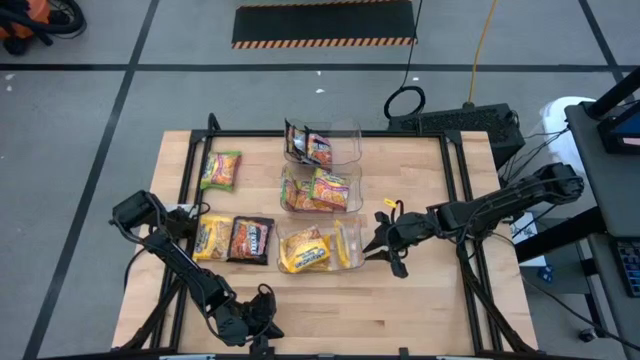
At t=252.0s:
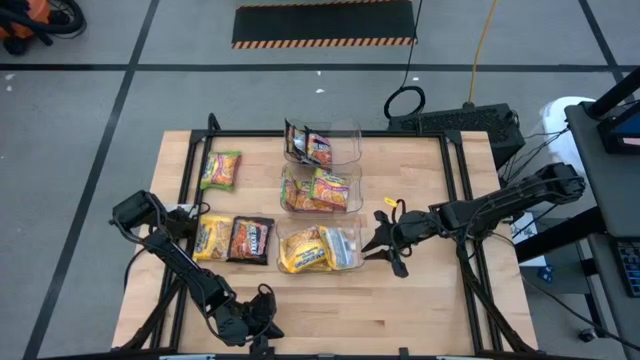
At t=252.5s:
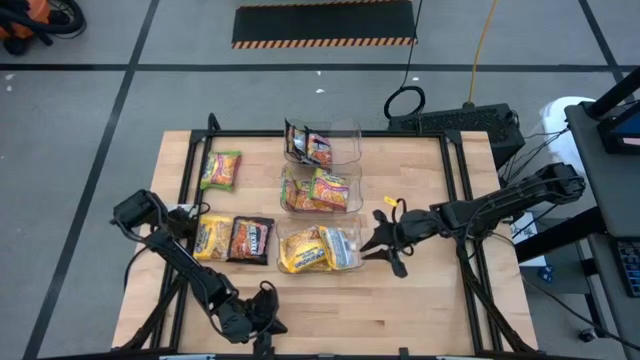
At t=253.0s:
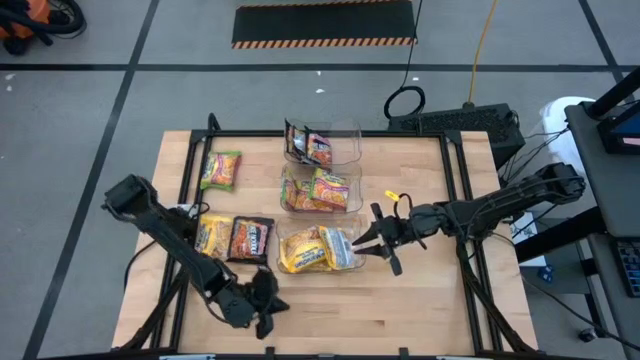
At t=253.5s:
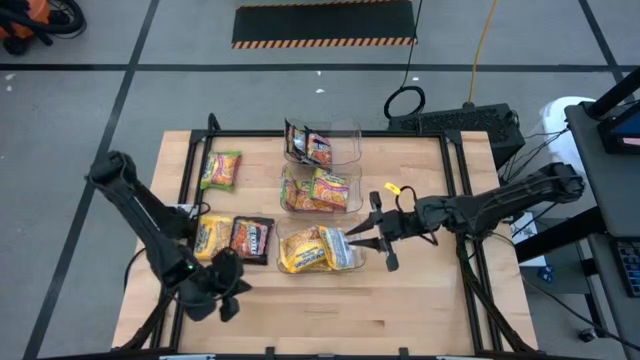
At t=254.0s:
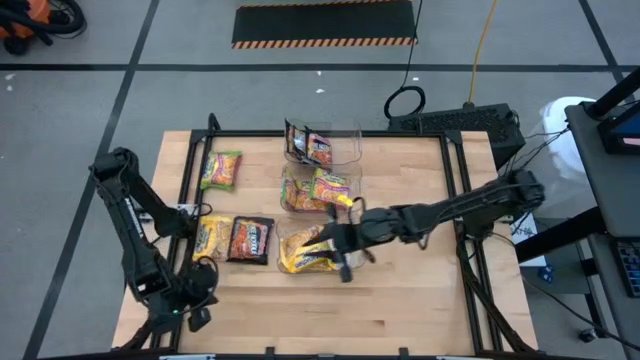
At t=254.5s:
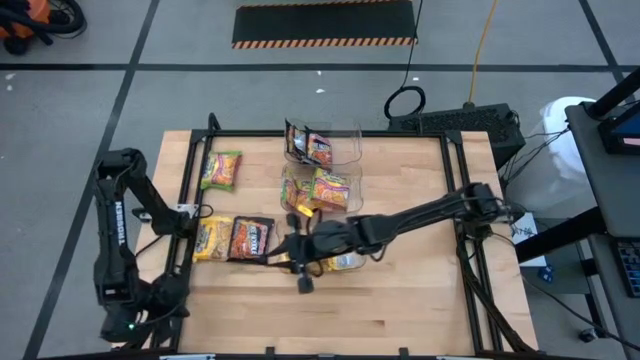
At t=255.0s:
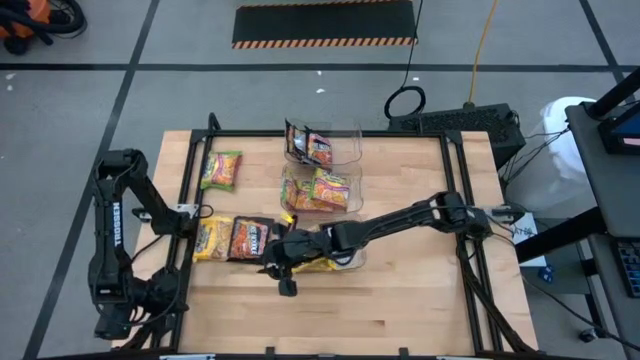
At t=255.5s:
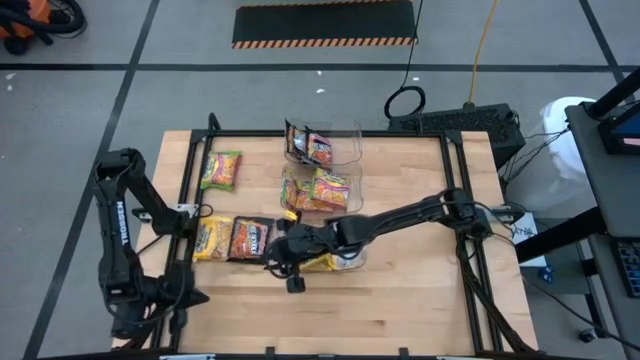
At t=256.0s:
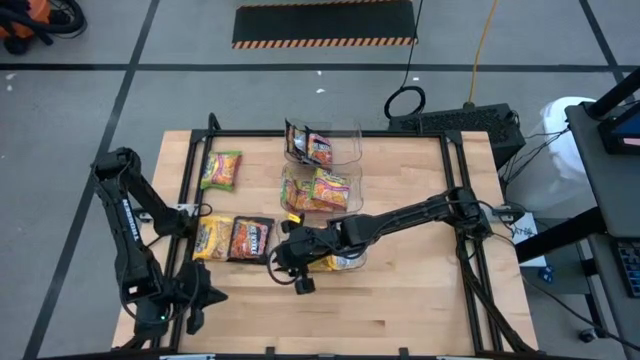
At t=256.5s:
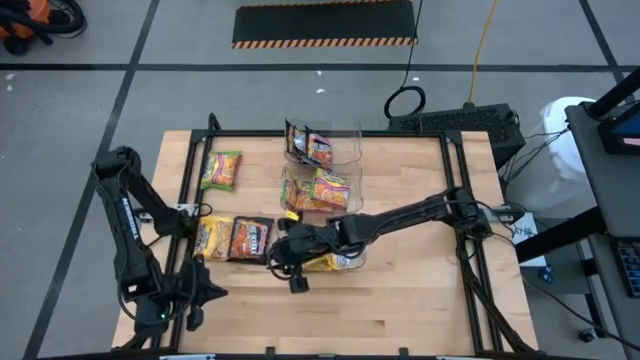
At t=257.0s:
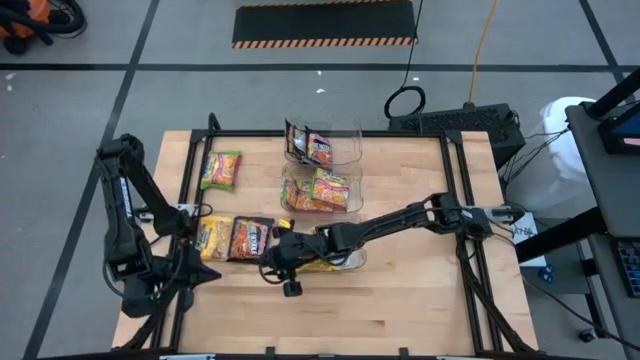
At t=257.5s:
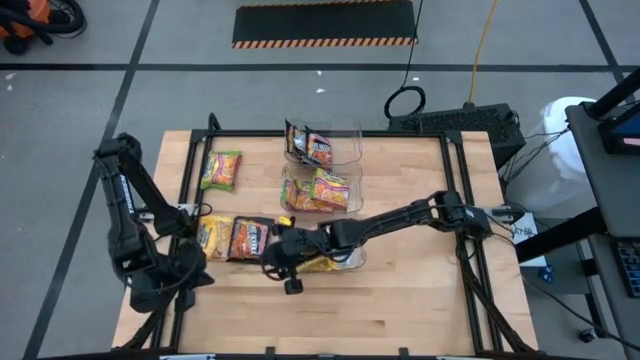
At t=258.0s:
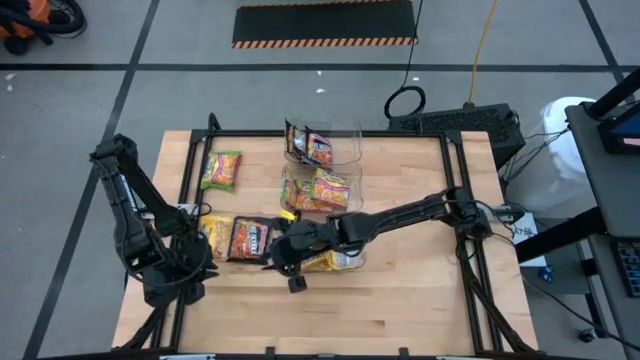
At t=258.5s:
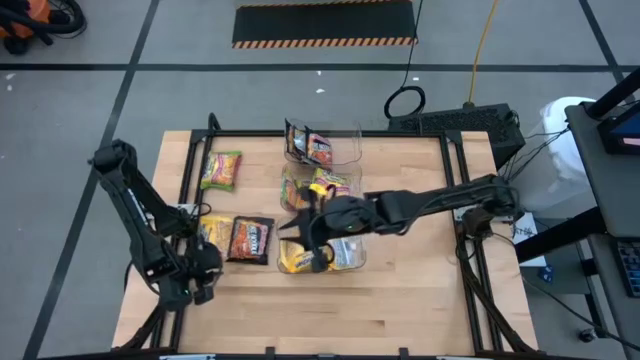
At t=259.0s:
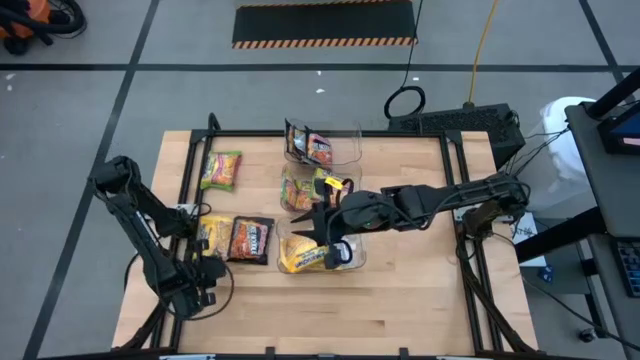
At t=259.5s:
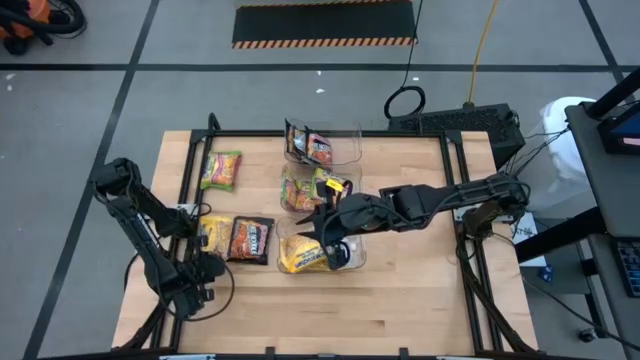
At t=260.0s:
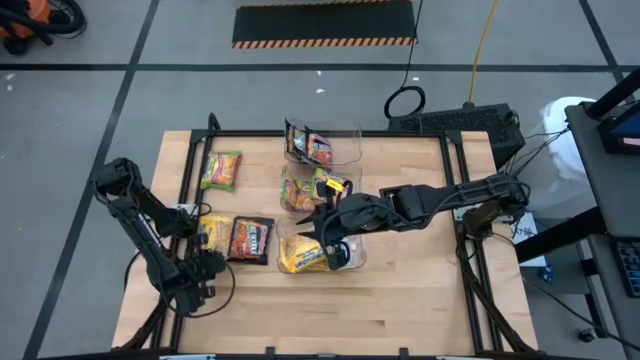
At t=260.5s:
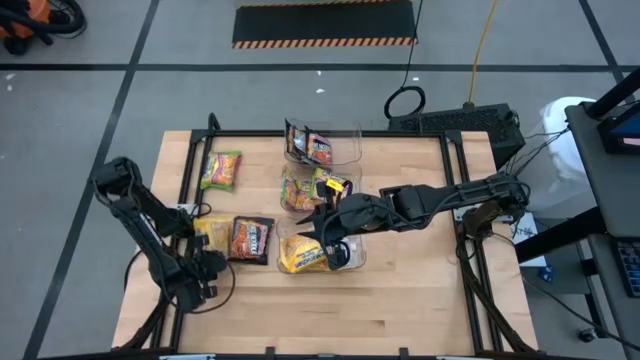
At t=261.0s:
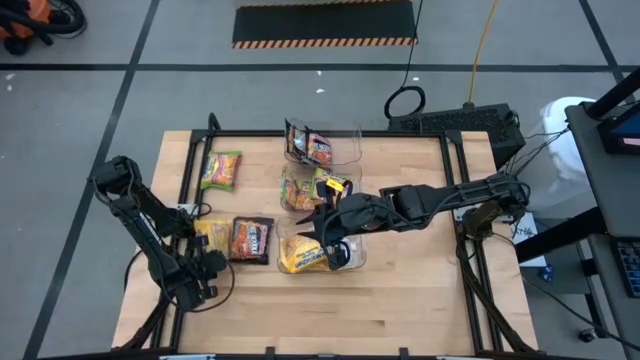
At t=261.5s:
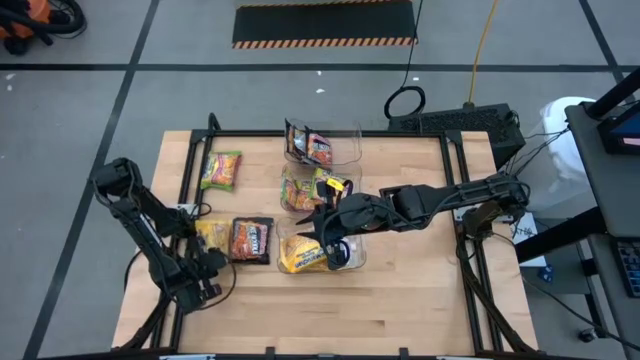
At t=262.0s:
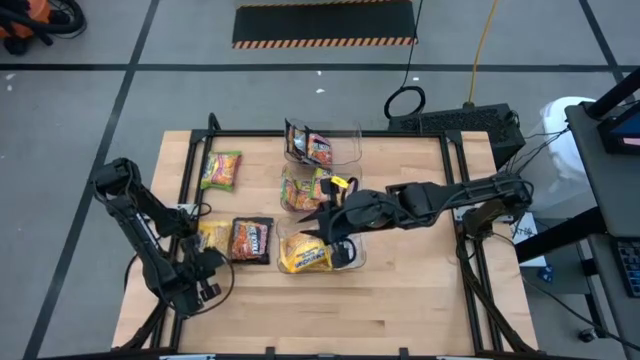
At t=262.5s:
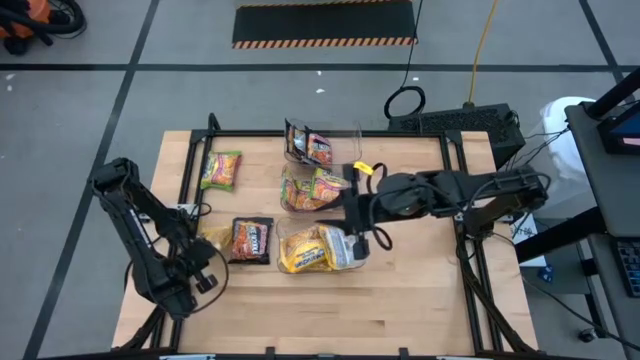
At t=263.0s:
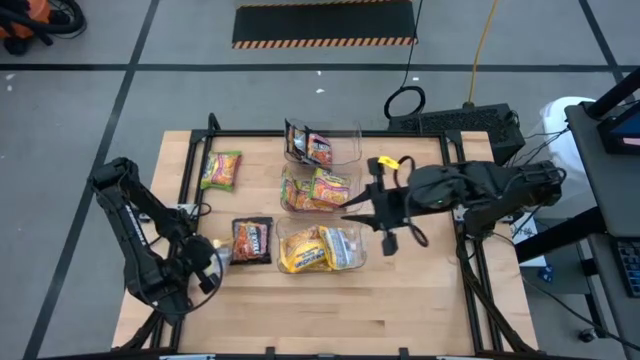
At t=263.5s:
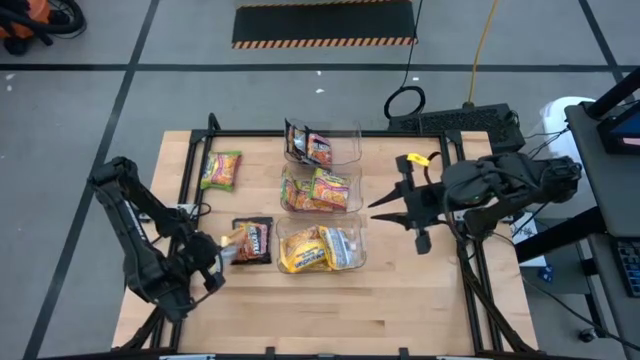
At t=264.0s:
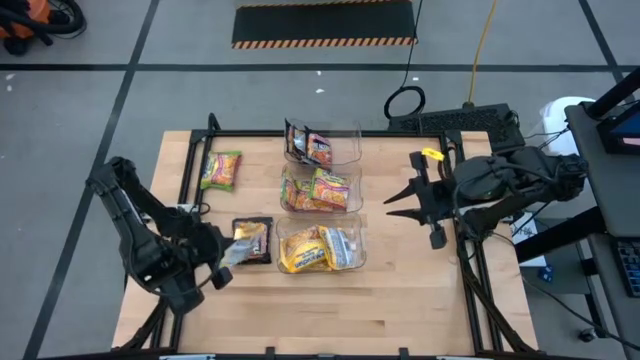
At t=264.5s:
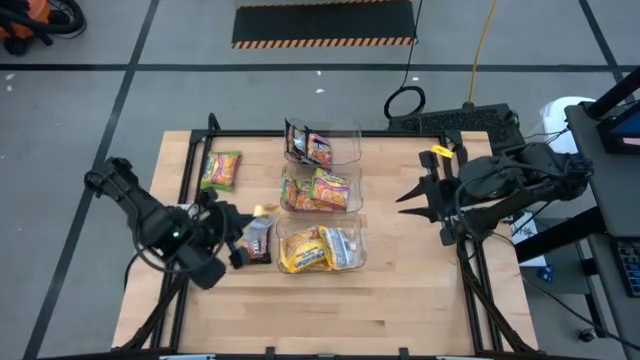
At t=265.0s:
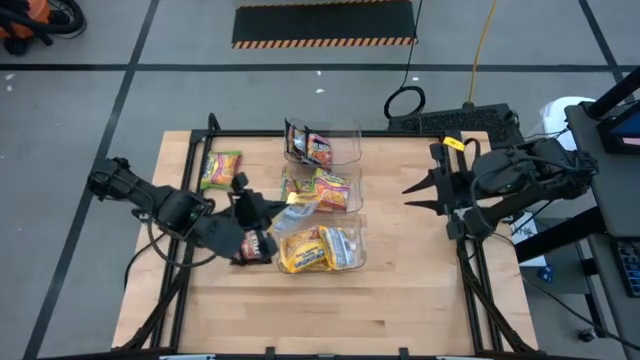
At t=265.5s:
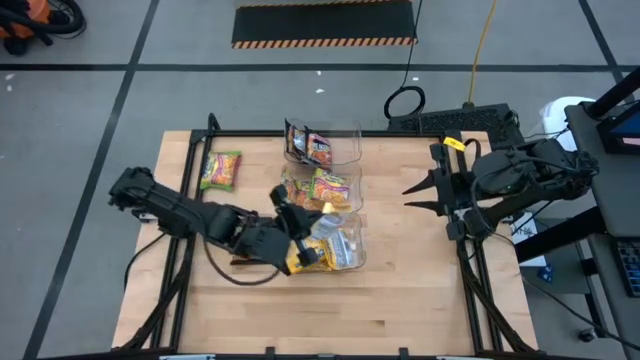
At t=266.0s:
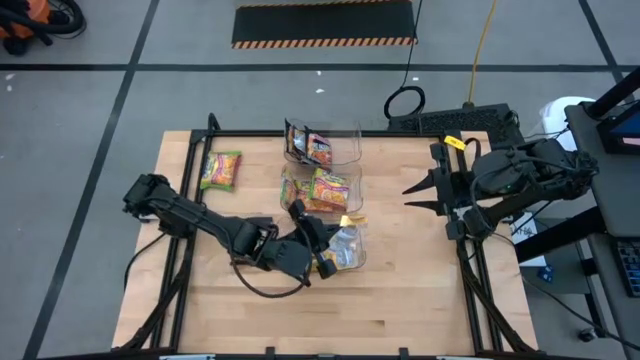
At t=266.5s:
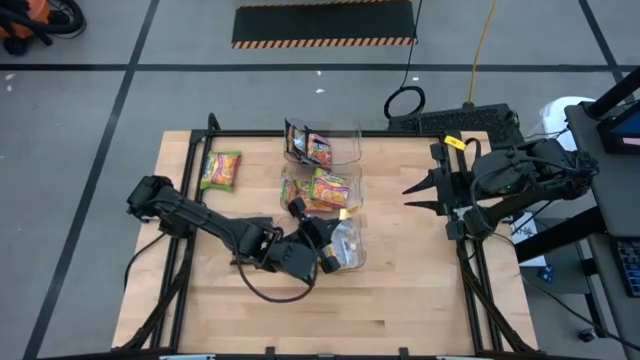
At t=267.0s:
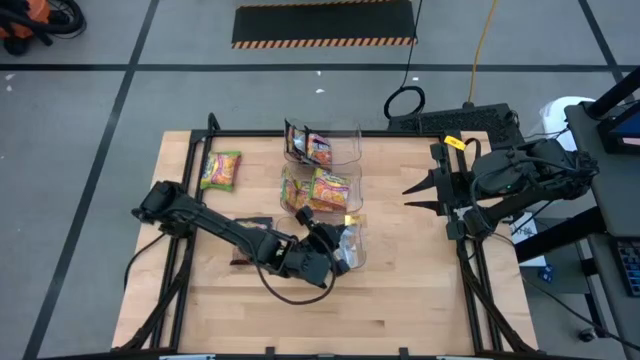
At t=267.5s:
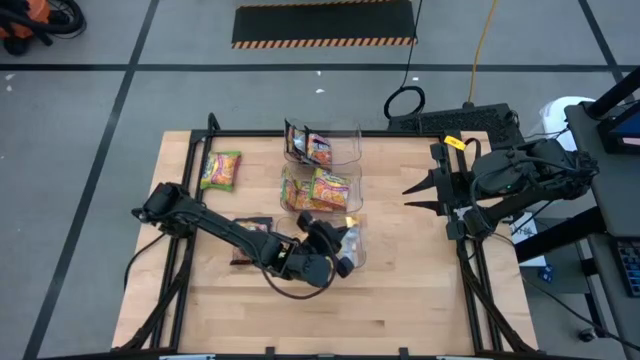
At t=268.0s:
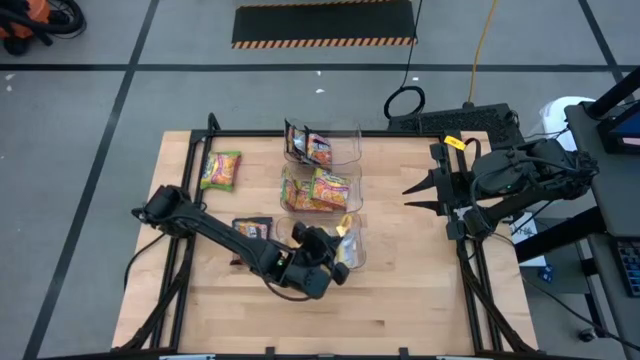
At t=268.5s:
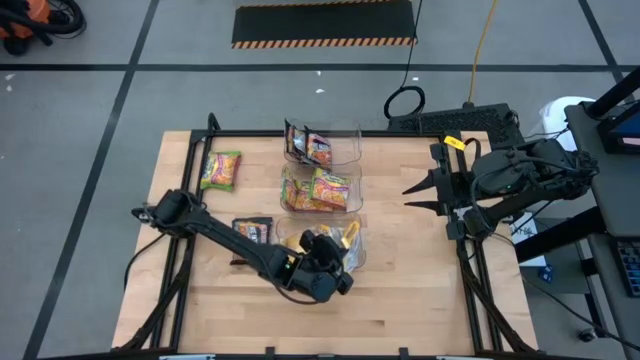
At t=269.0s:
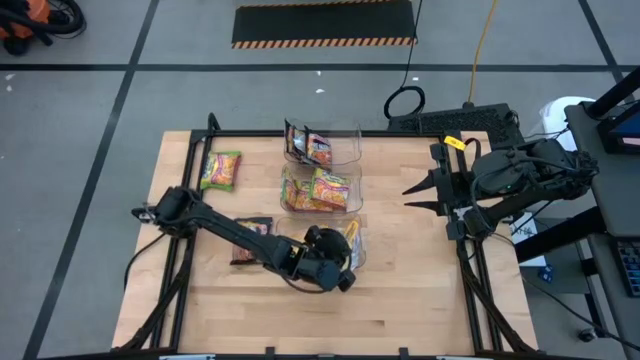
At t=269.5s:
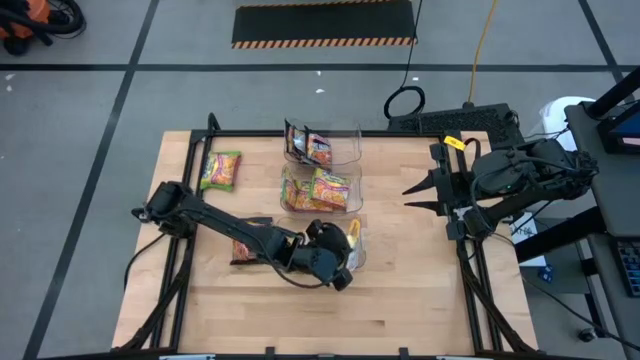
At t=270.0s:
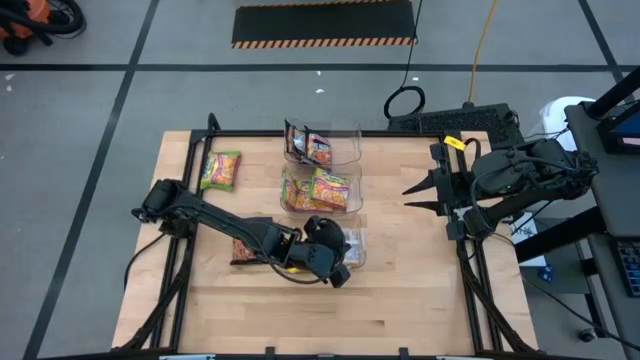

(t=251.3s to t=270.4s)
Task: Sort Maruchan noodles
Put the yellow noodle pack into the bottom transparent bin

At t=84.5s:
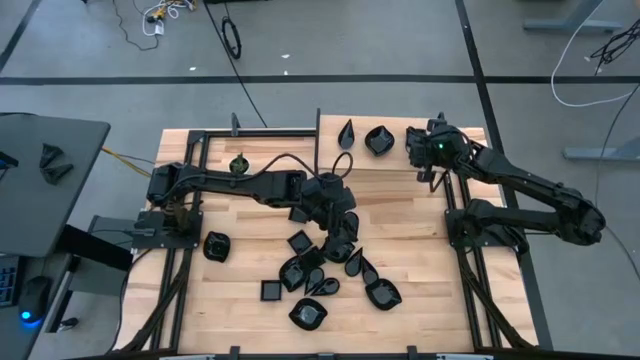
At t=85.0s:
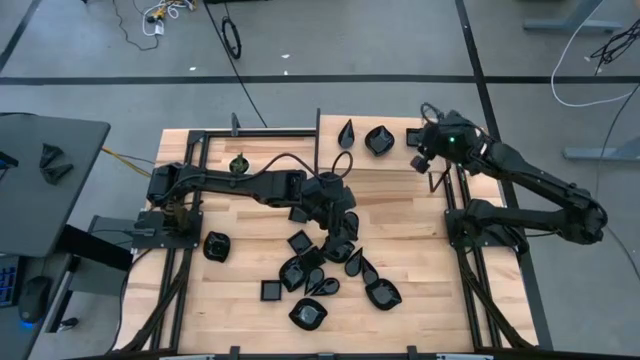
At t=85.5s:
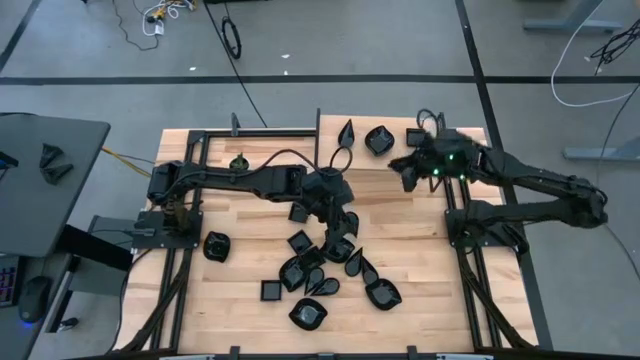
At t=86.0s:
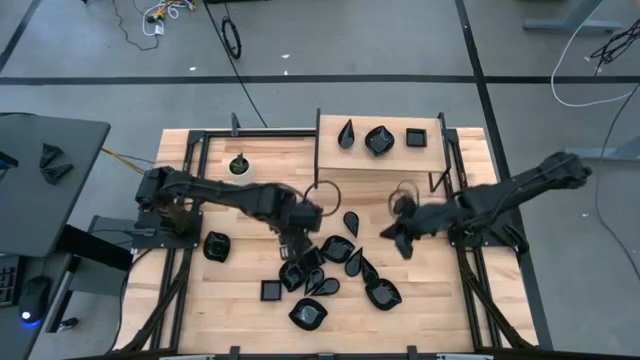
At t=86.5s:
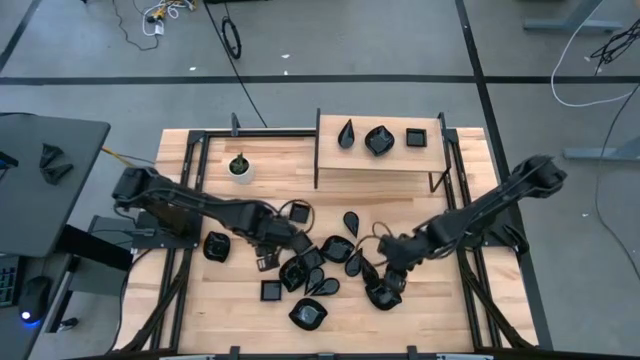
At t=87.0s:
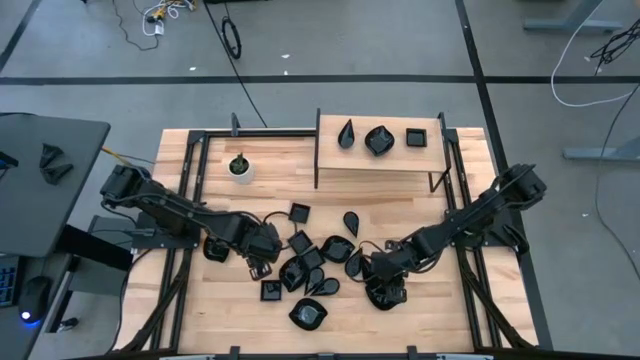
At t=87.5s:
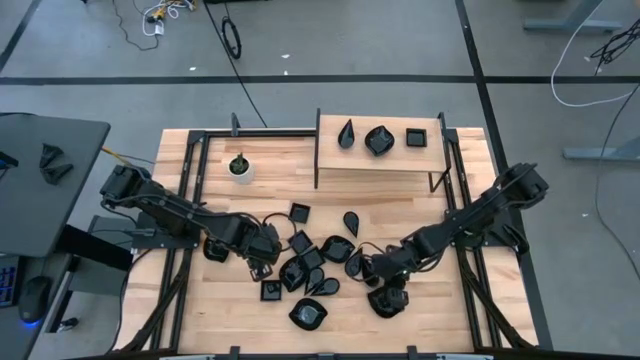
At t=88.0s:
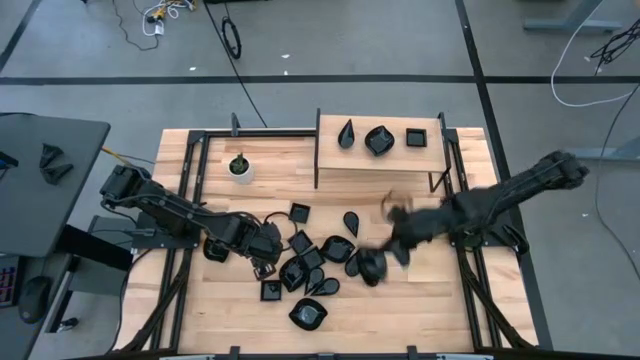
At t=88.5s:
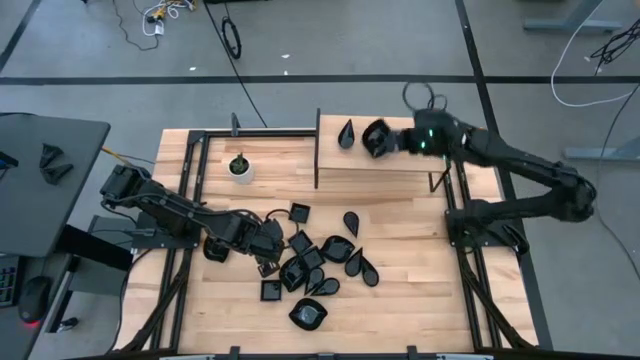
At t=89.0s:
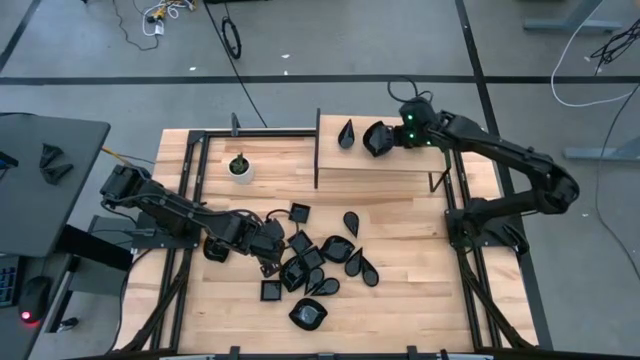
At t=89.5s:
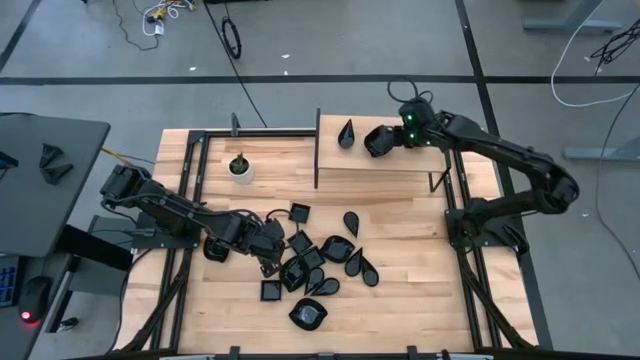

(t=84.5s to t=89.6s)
Task: Pick & Place Mini shaped plates
Stack the leaf-shaped plate on top of the leaf-shaped plate on the shelf
